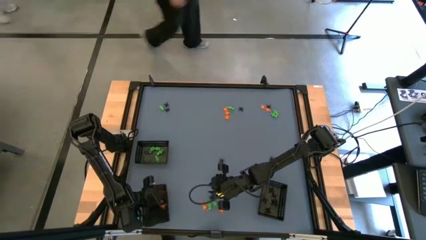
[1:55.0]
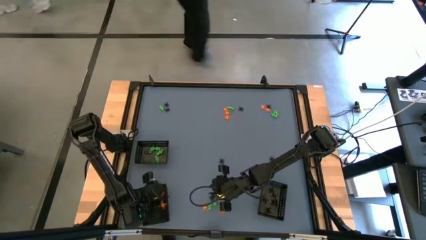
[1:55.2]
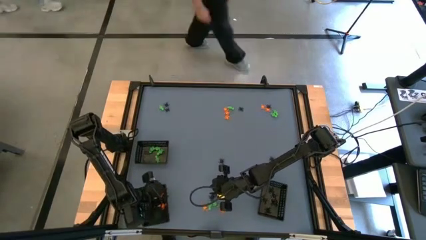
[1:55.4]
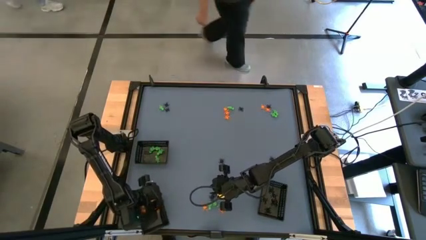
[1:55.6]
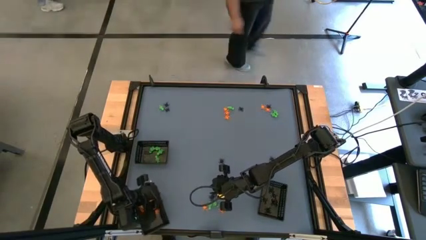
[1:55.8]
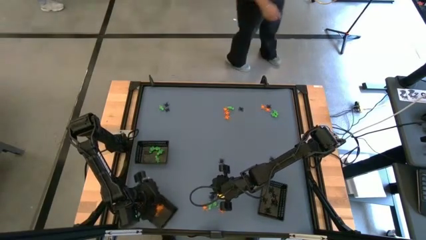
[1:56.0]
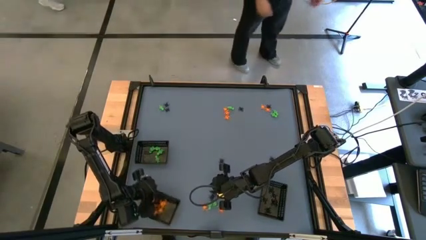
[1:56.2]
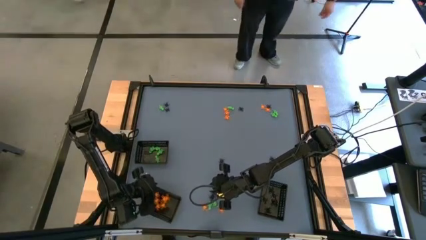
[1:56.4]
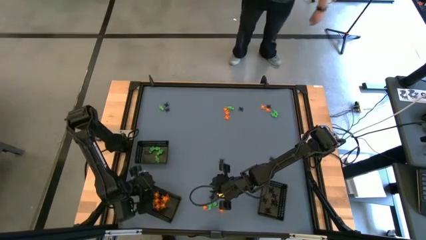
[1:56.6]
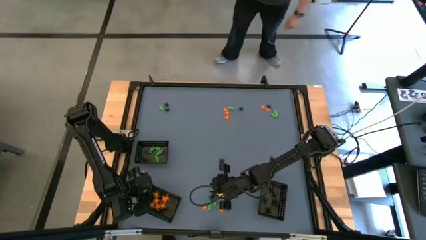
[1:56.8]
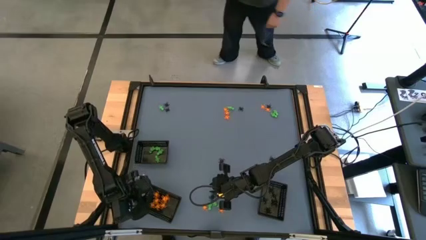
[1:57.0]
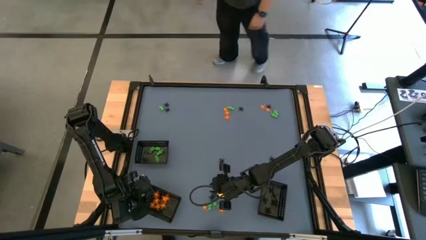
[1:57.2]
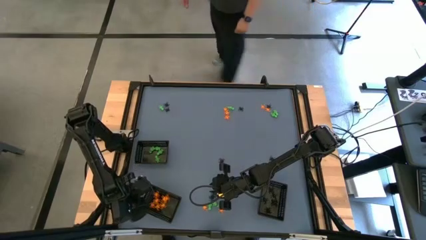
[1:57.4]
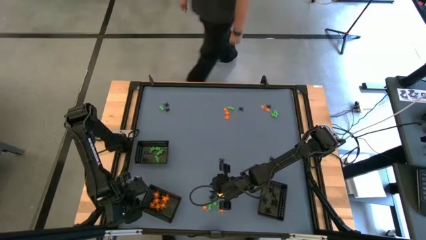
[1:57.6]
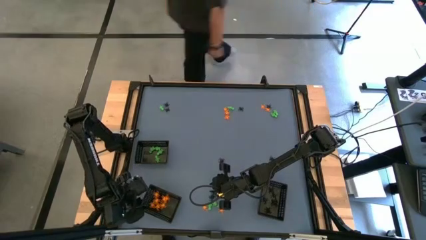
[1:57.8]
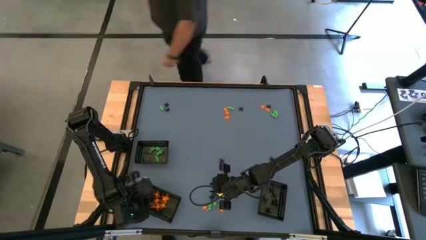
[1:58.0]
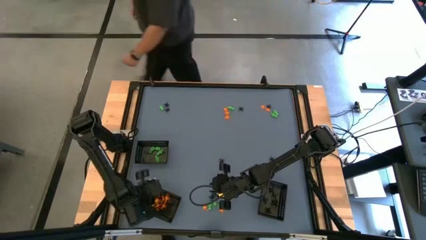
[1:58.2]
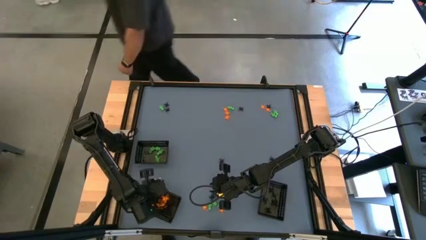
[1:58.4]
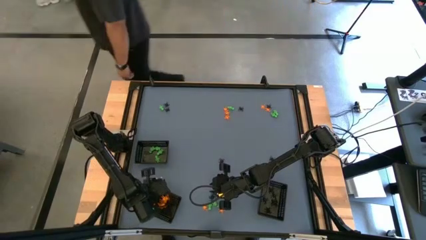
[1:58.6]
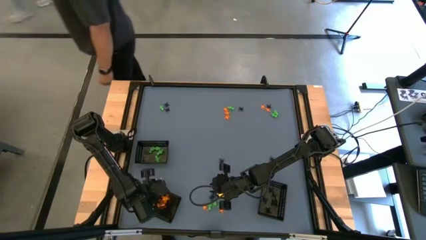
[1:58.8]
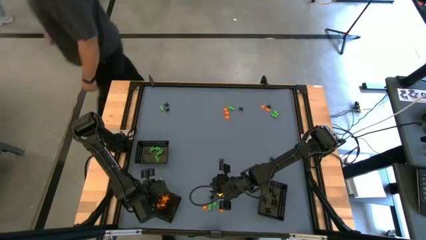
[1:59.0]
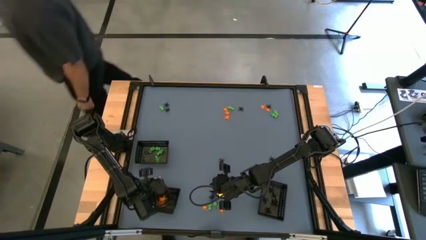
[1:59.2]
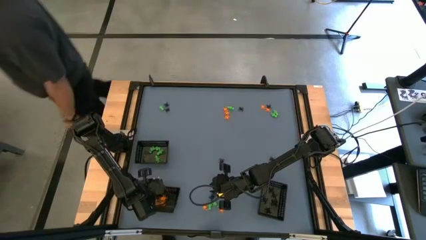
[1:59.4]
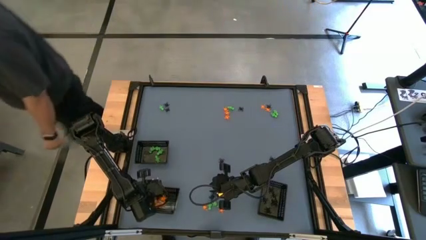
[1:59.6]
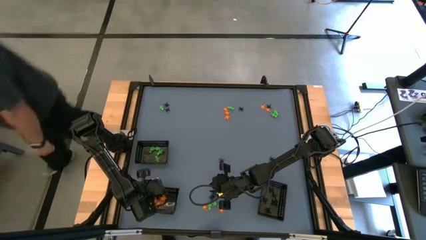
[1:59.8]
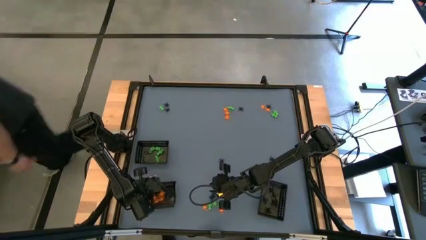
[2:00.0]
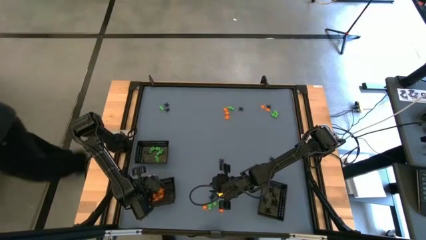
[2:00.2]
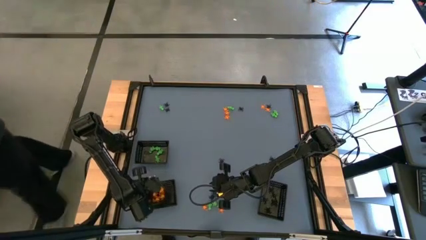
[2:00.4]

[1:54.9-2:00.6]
Task: Sort Halloween decoration
Adjust the bottom left black bin

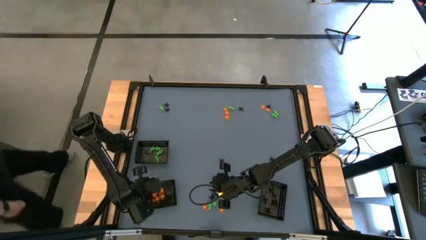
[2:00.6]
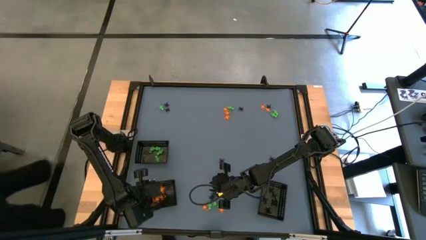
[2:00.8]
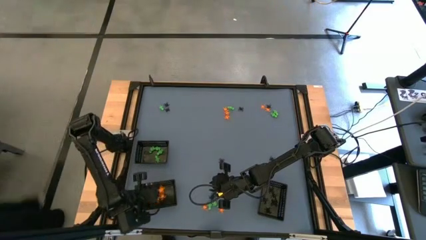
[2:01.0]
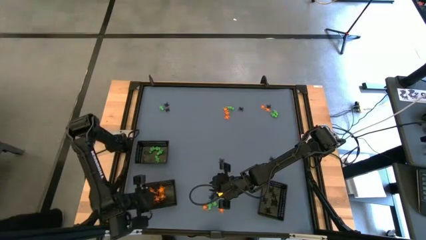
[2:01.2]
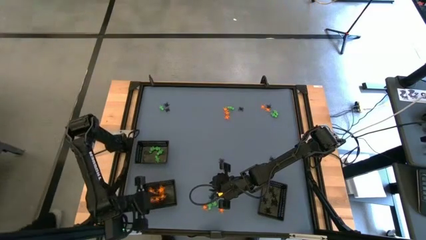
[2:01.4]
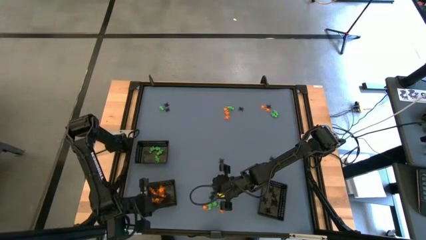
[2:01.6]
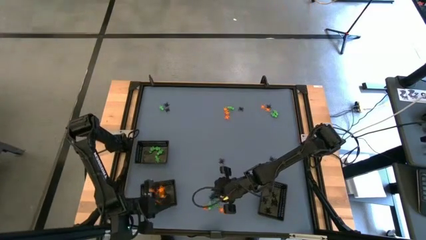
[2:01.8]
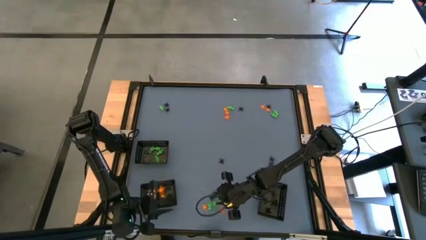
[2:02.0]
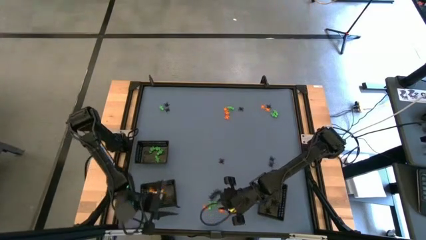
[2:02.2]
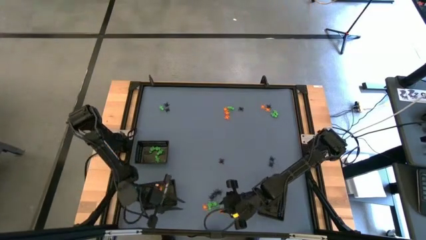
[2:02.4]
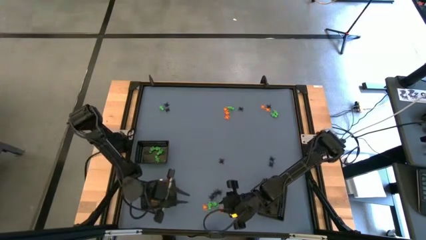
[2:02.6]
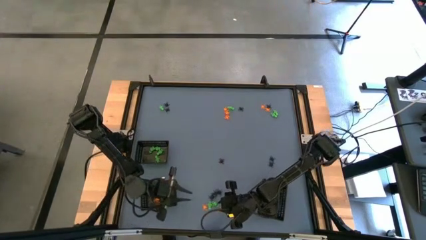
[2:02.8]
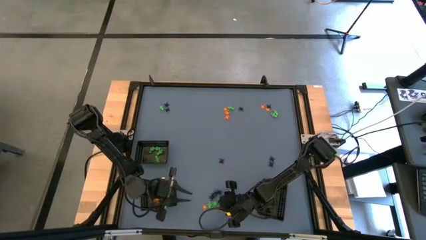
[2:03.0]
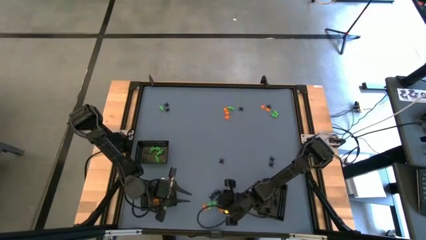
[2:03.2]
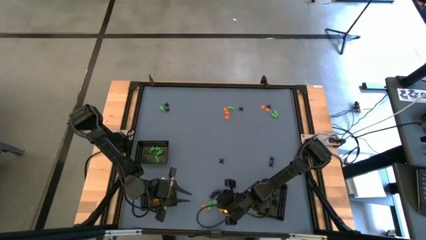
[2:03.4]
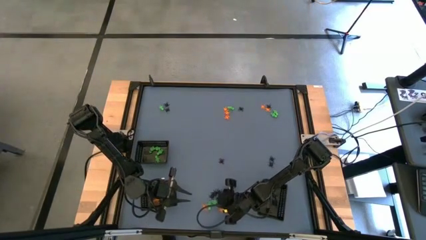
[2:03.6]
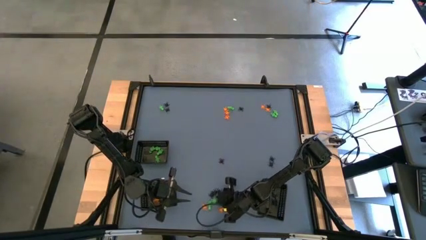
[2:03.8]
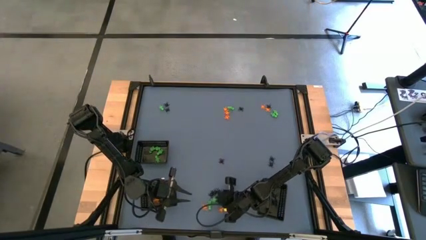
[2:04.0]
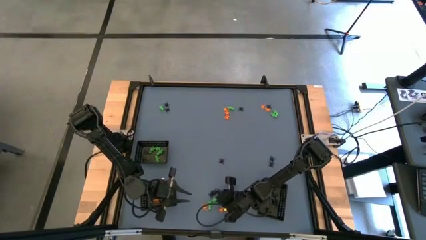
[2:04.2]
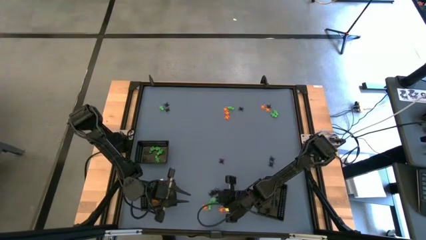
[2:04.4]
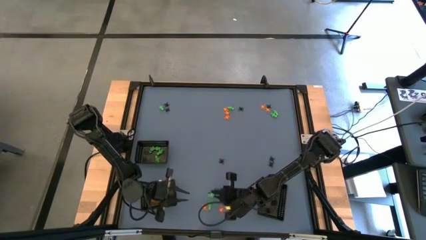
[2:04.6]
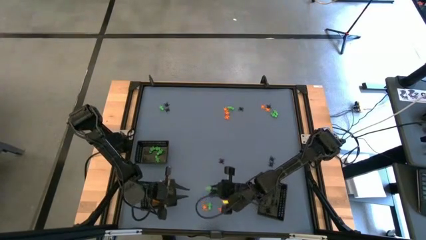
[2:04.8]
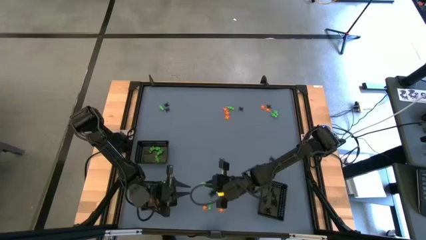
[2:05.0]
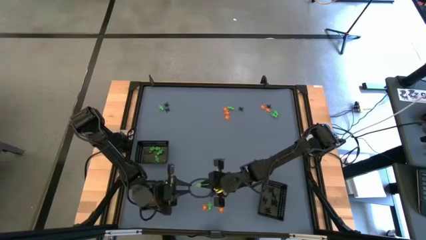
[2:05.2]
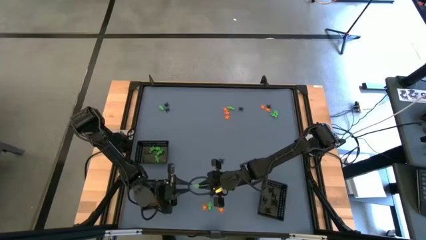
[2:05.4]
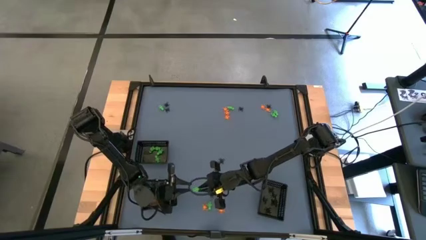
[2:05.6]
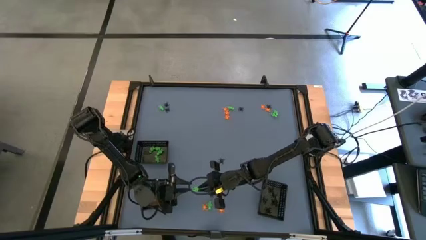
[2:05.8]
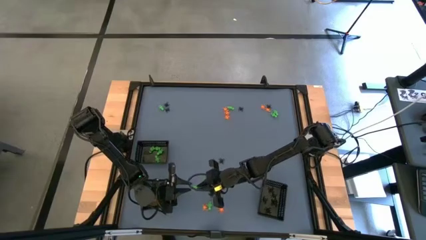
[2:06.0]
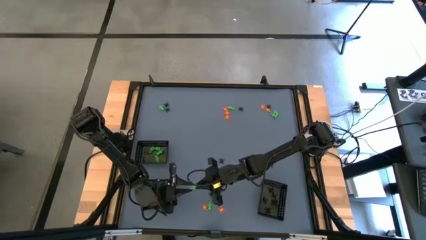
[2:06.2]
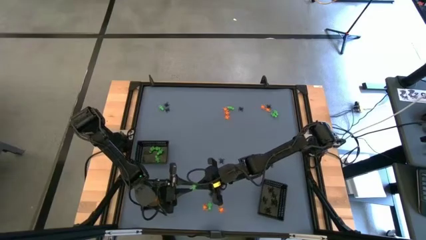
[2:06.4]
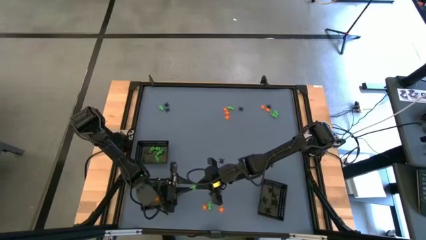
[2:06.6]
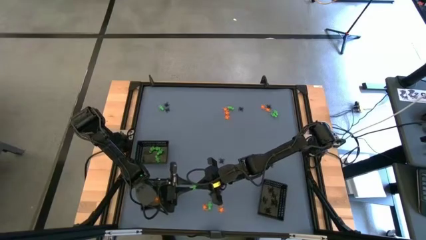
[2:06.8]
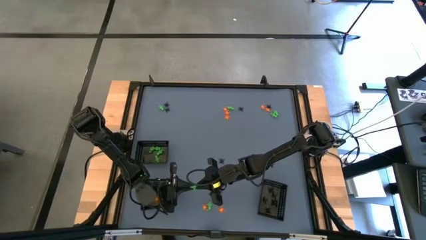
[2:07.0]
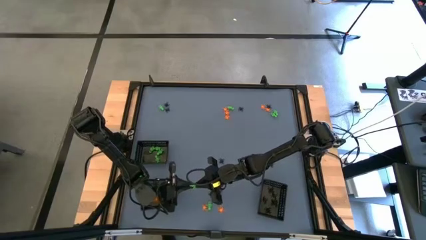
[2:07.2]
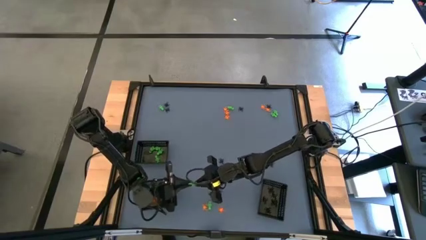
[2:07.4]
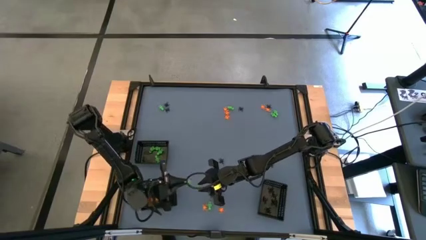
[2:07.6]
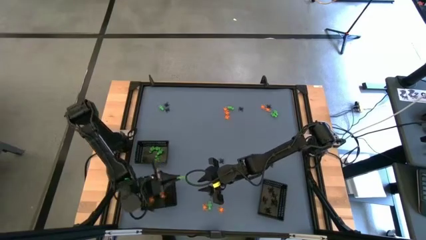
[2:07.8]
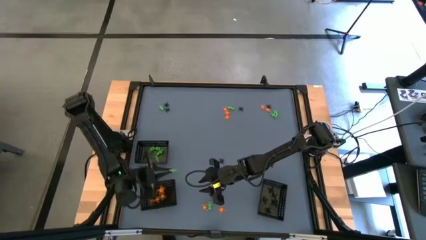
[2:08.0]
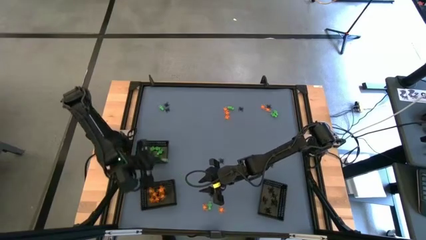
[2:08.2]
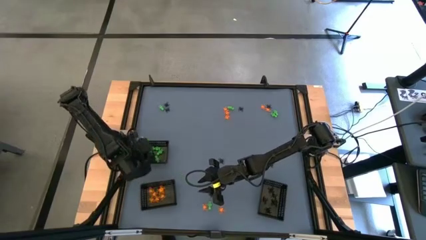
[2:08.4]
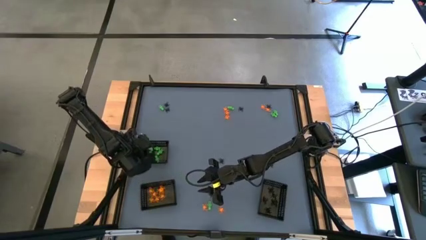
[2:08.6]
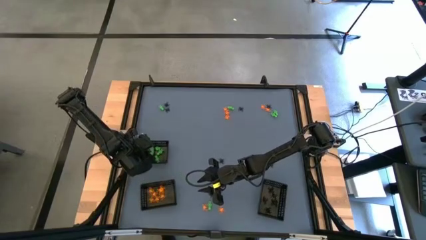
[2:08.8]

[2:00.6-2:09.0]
Put the green skeleton toy into the top black bin

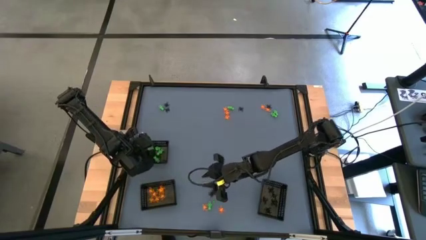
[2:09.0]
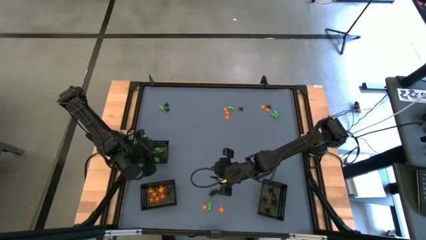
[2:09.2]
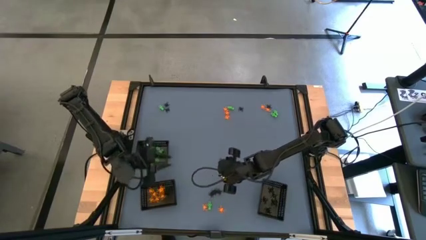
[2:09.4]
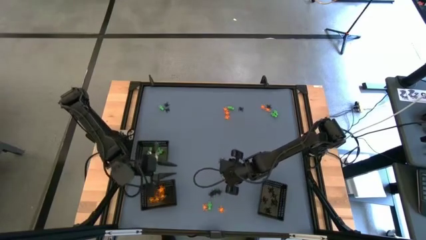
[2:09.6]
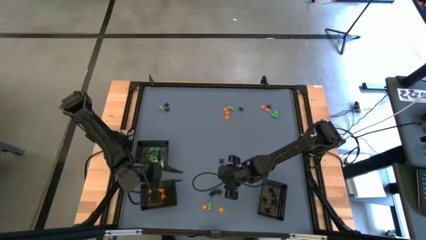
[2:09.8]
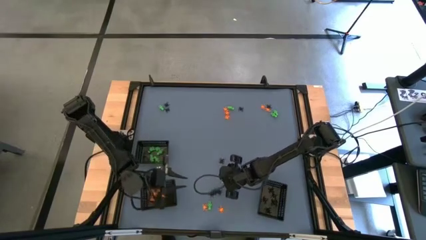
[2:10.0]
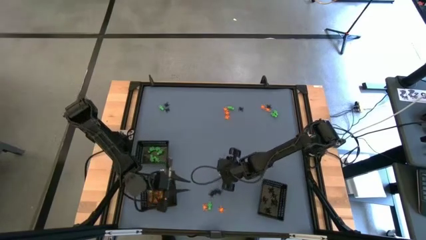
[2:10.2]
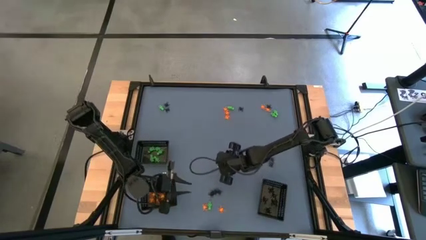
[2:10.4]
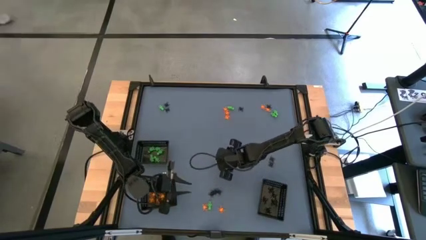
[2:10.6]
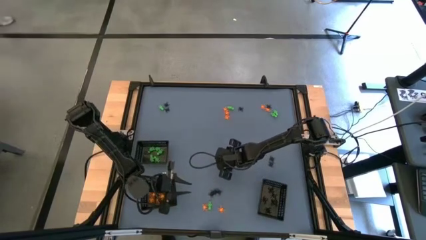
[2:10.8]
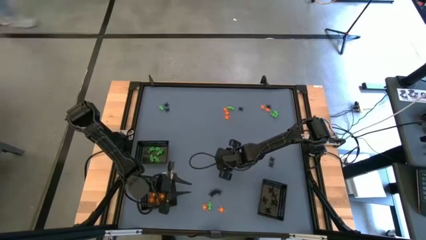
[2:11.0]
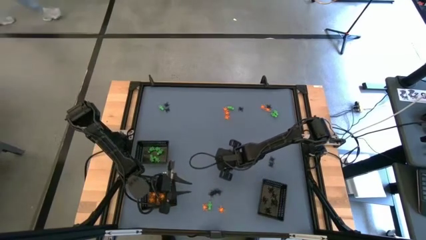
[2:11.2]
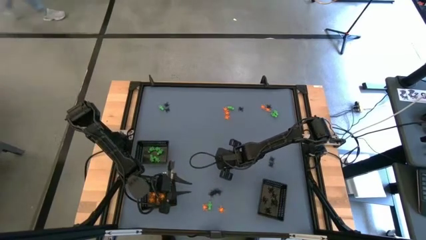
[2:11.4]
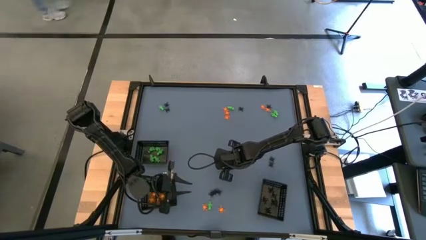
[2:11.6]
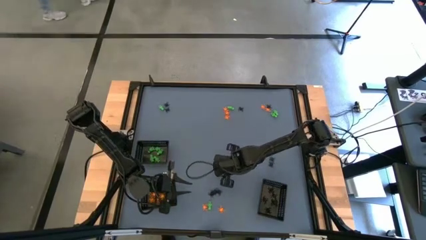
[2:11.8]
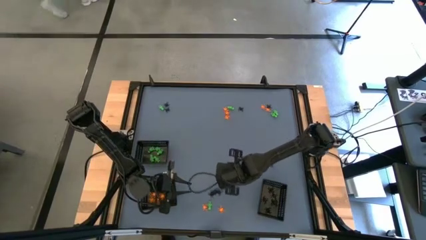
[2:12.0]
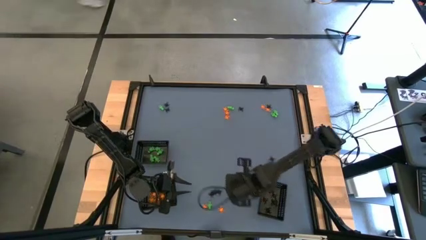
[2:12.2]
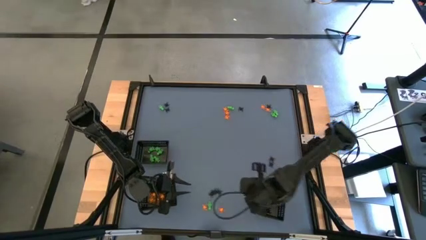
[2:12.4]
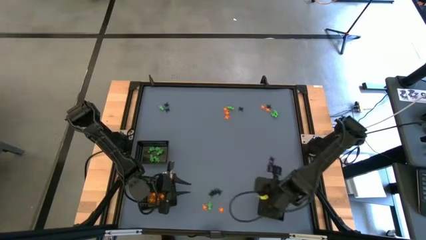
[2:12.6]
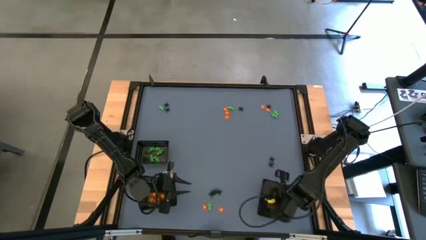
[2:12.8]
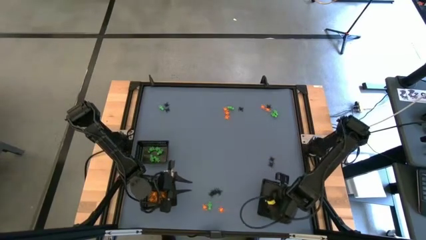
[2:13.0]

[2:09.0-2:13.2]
Put the black spider toy into the bottom right black bin
